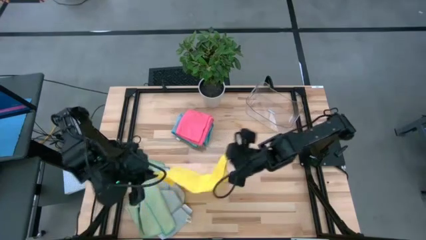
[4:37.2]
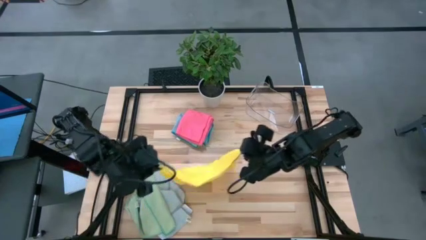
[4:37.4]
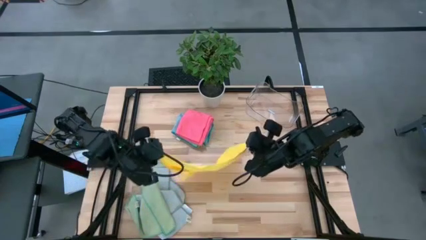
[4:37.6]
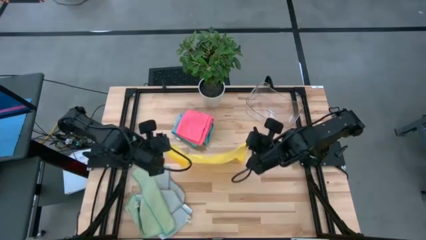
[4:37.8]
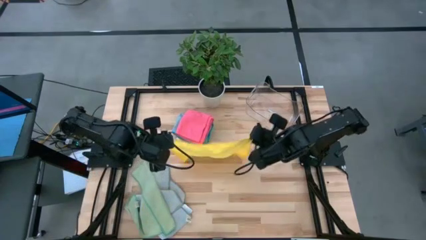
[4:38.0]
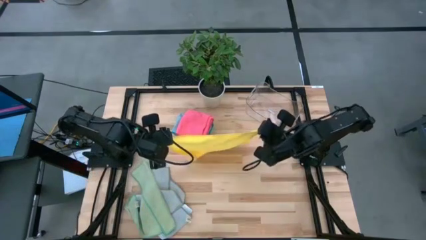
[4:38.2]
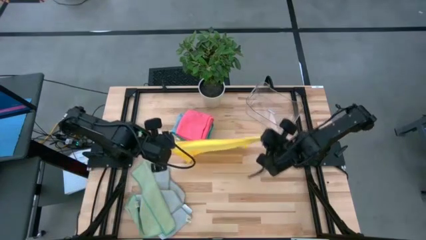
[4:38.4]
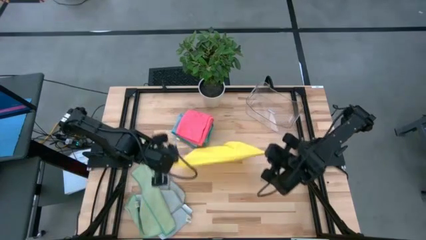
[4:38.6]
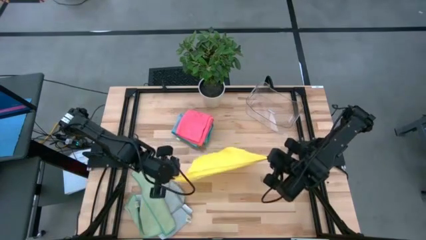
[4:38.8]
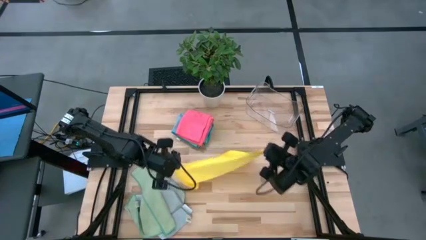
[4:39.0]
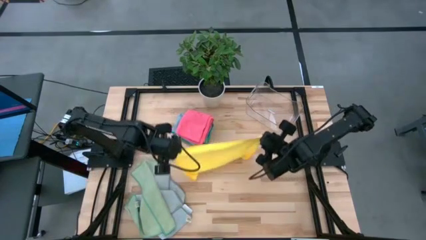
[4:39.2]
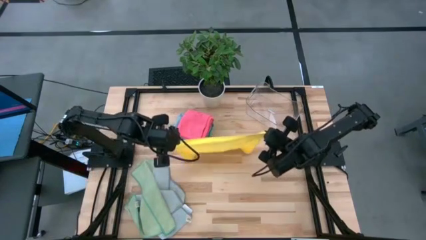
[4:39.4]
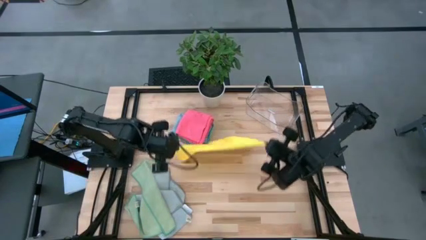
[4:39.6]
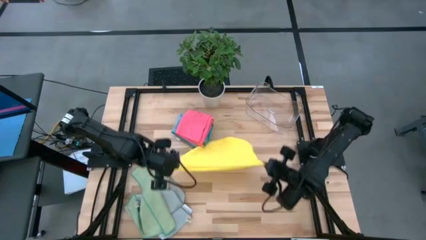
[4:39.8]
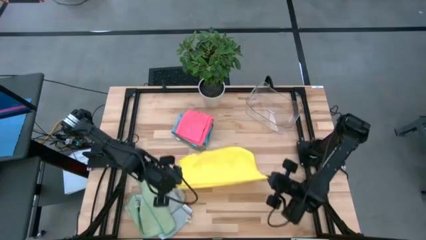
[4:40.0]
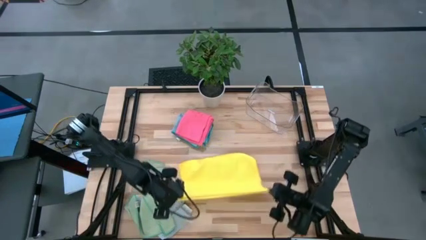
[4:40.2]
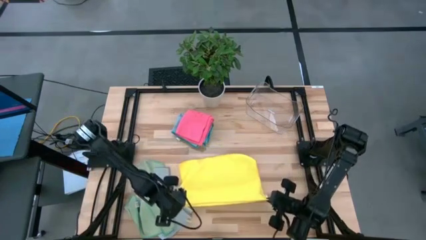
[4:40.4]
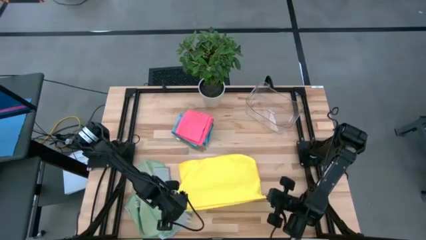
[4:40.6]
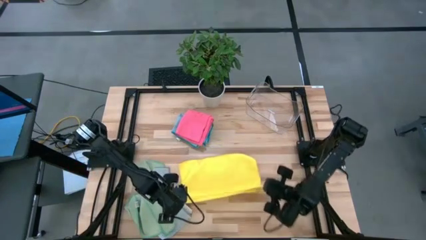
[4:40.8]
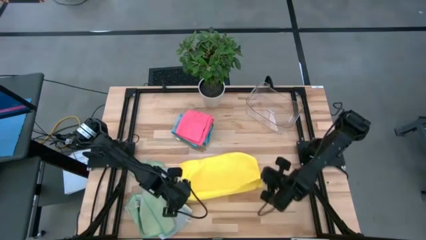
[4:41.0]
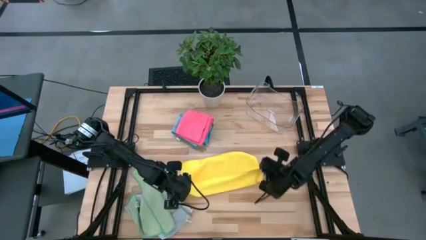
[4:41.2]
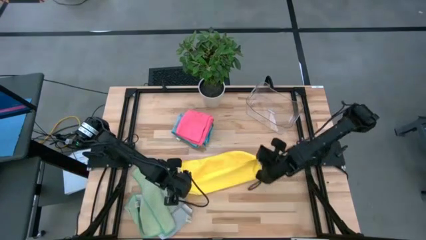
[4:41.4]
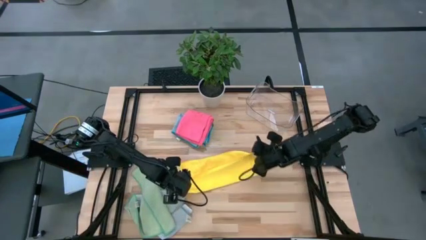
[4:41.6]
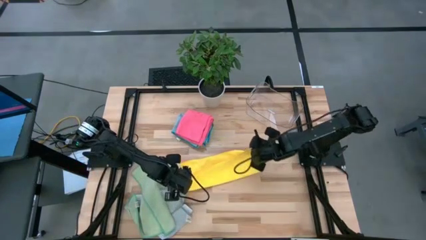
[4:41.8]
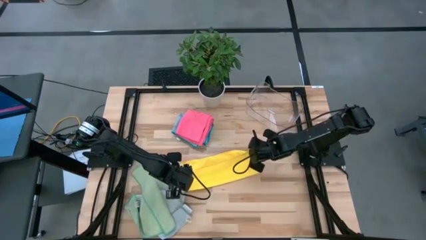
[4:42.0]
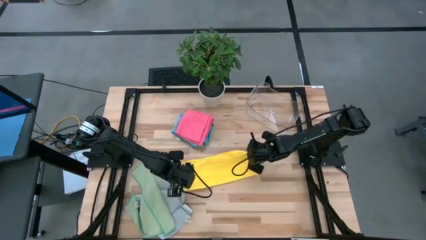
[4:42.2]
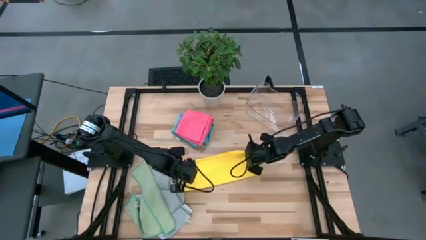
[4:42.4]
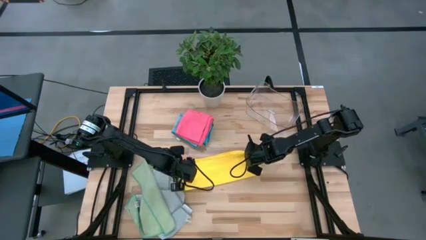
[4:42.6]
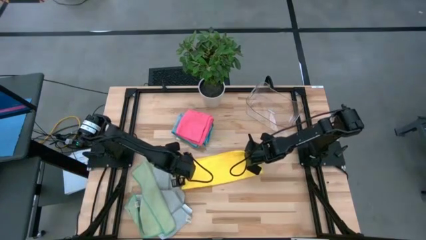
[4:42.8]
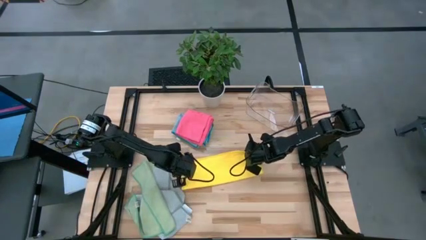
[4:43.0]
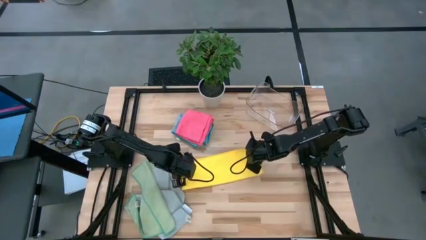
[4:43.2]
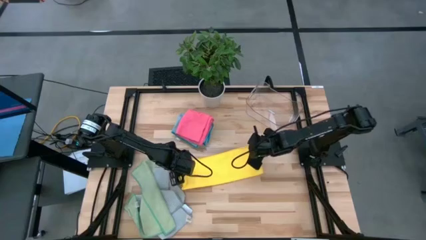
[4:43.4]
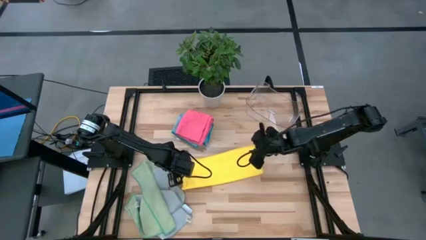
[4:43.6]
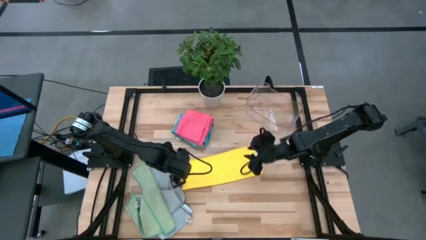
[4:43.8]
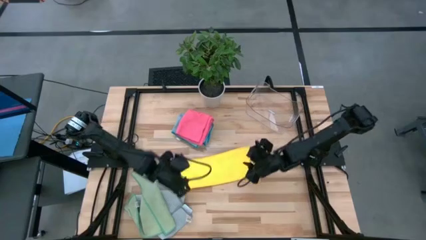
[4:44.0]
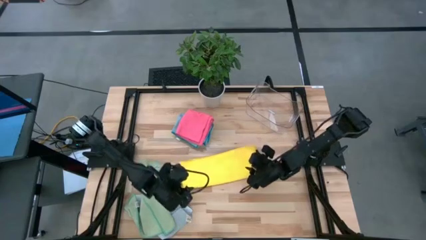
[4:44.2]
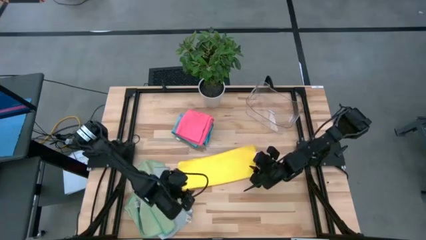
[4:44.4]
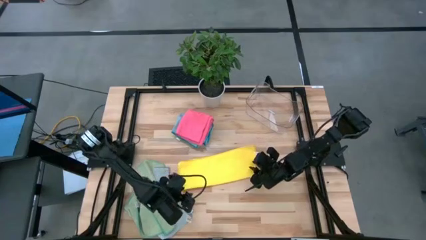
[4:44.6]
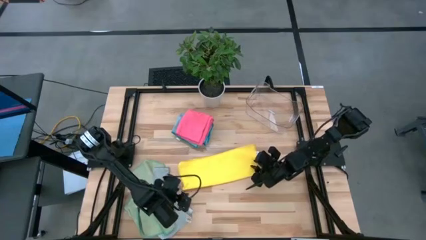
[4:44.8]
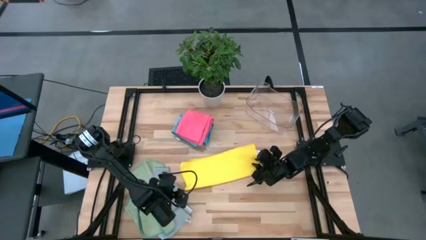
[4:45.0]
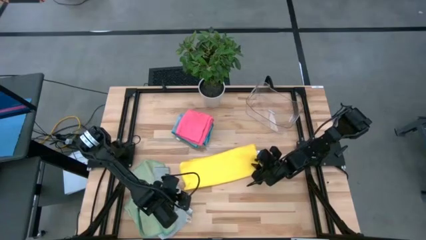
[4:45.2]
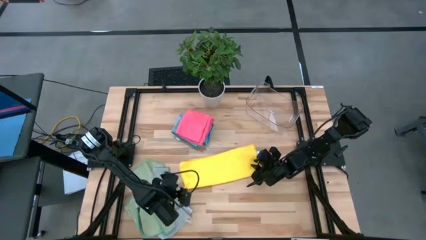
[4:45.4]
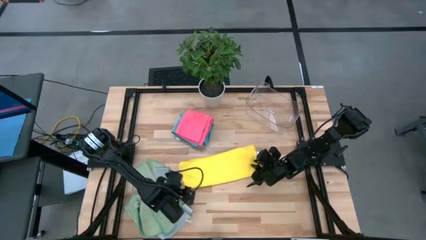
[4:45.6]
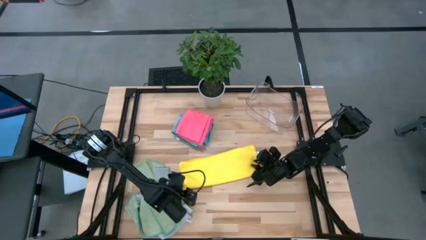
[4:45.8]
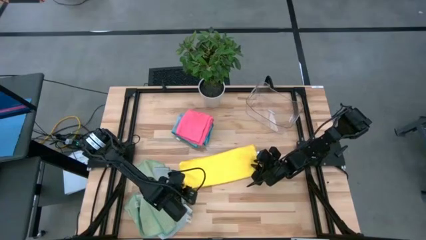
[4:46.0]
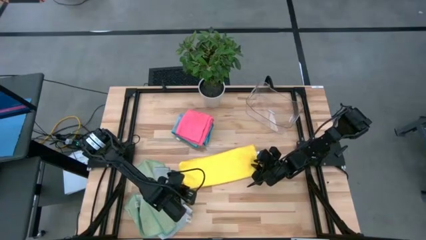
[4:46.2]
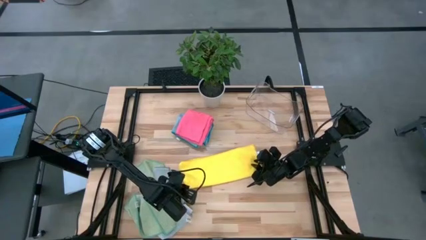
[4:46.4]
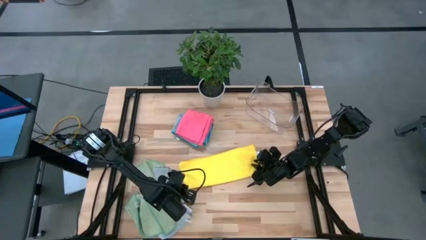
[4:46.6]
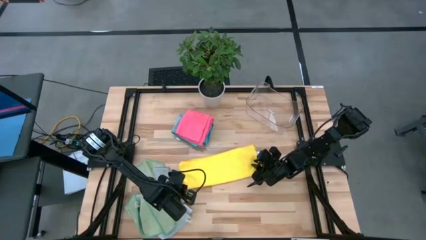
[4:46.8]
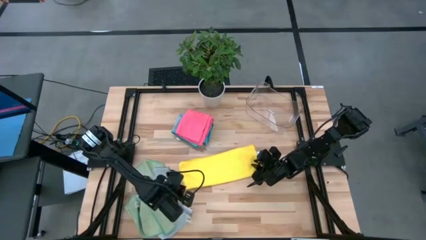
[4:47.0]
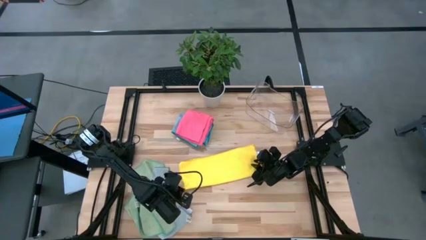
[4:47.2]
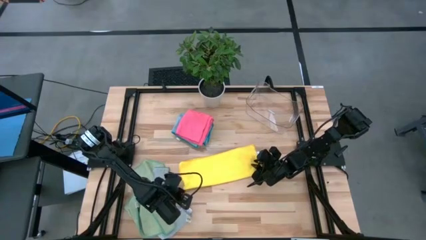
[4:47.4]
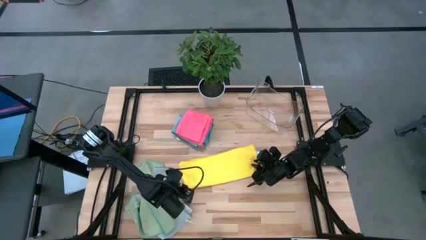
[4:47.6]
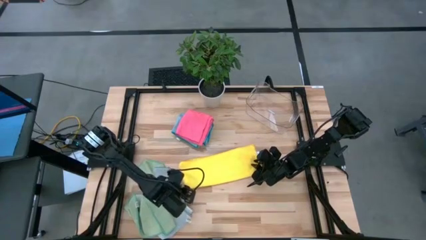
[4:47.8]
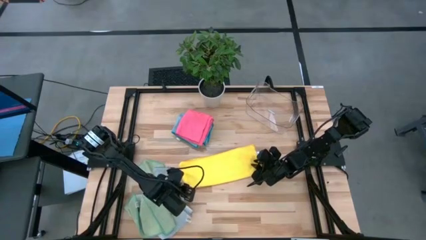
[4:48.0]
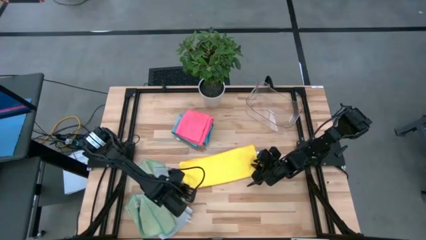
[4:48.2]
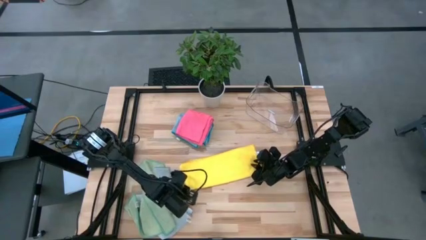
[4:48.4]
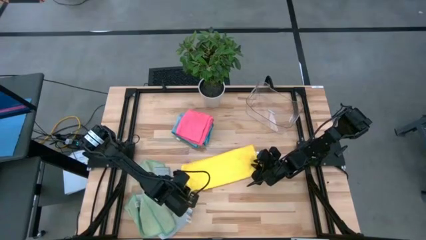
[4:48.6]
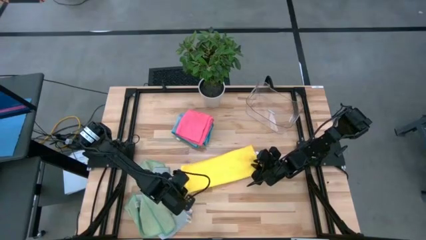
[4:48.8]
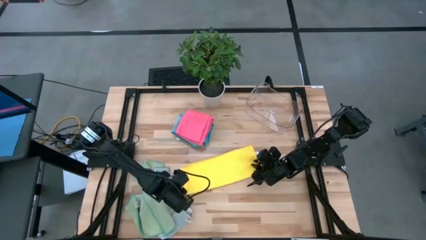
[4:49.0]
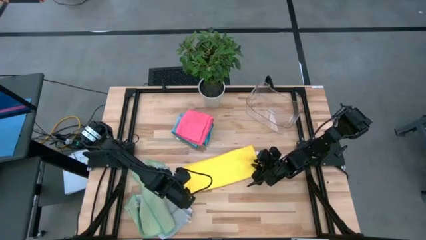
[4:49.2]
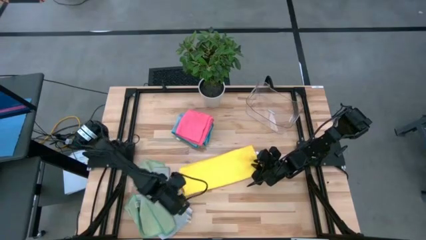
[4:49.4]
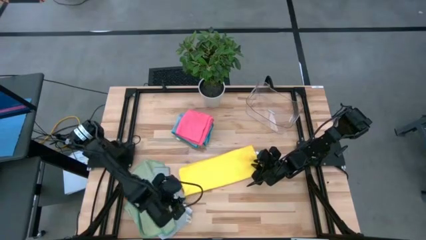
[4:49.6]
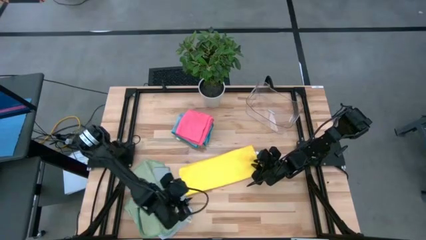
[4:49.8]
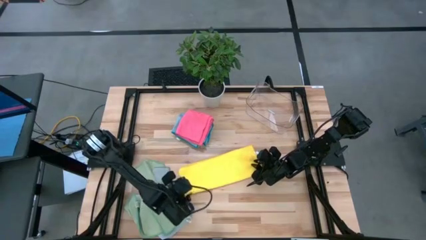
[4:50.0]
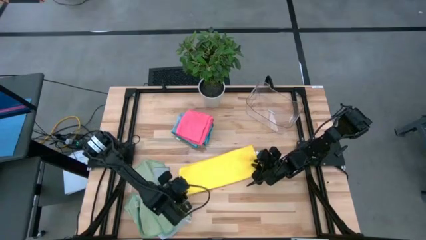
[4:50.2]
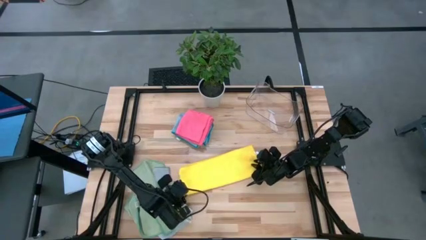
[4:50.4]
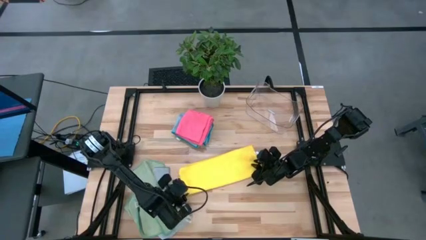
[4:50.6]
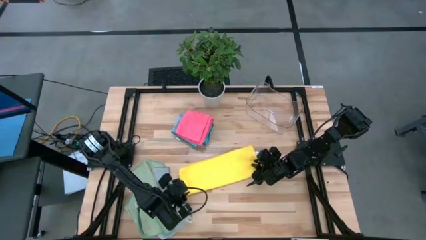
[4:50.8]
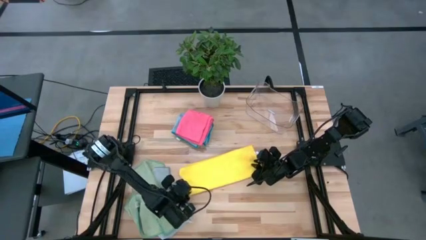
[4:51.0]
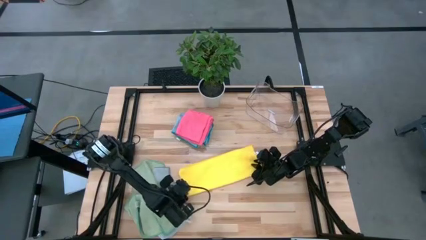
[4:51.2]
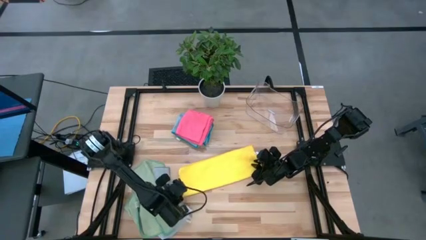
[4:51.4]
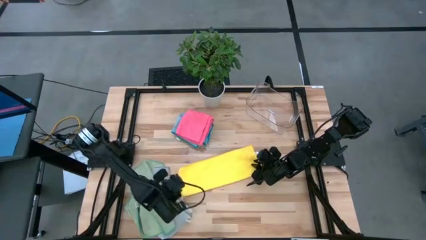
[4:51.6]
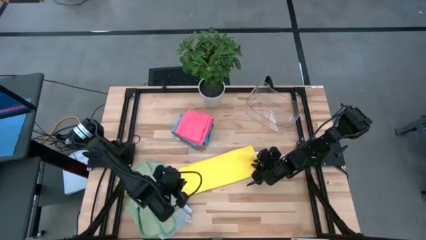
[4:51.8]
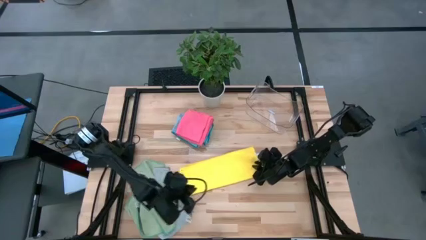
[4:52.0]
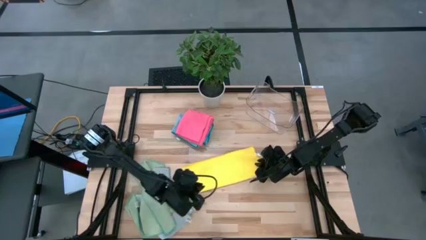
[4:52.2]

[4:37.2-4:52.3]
Task: Fold microfiber towels
Fold the yellow microfiber towel

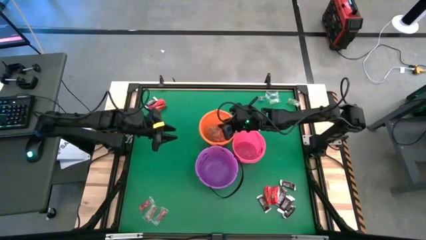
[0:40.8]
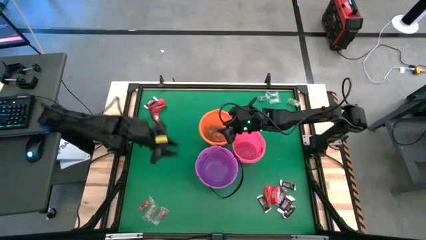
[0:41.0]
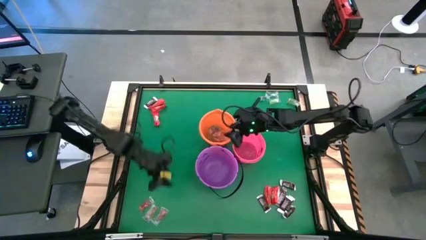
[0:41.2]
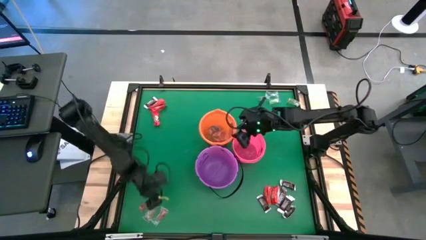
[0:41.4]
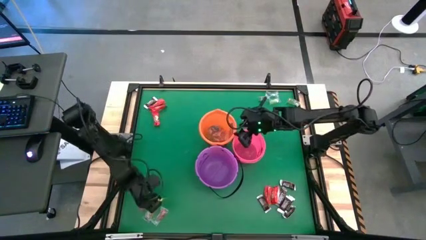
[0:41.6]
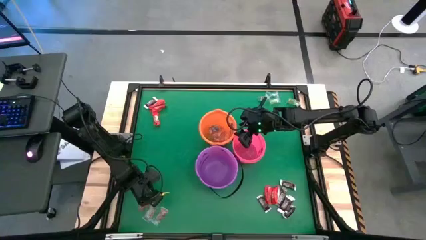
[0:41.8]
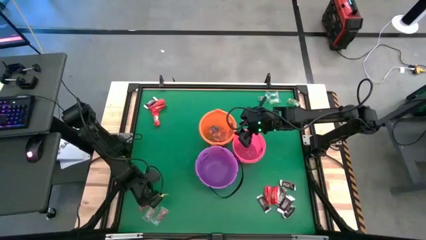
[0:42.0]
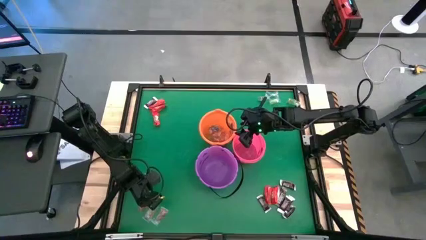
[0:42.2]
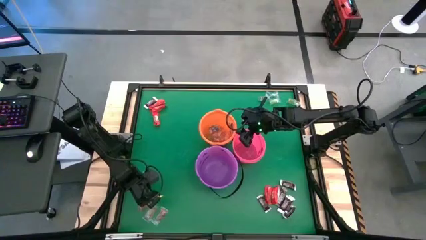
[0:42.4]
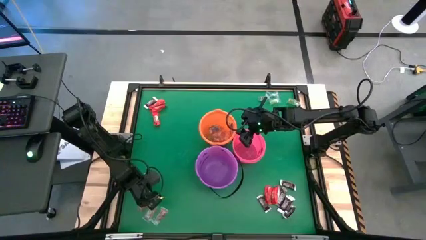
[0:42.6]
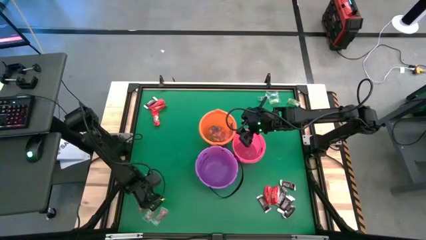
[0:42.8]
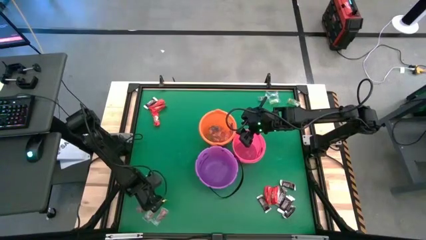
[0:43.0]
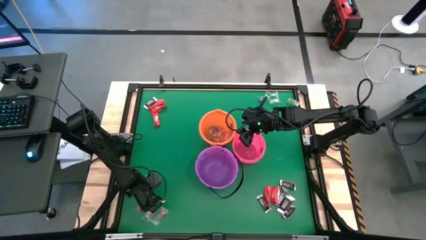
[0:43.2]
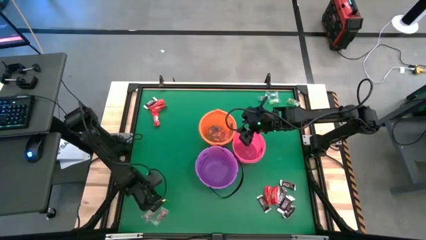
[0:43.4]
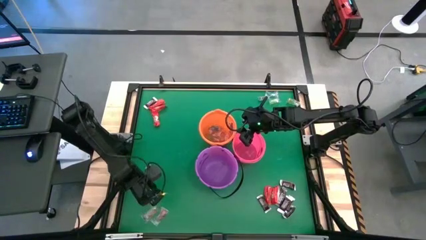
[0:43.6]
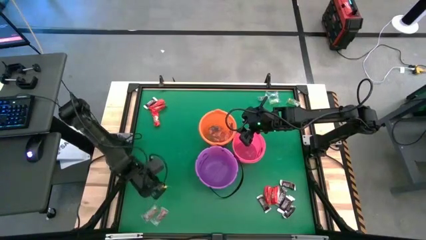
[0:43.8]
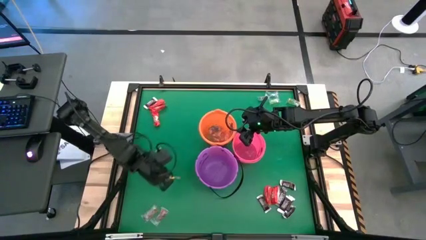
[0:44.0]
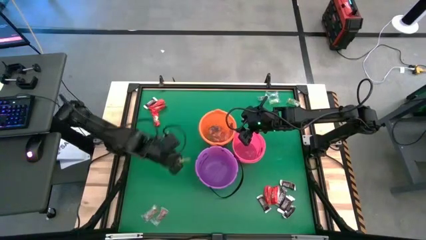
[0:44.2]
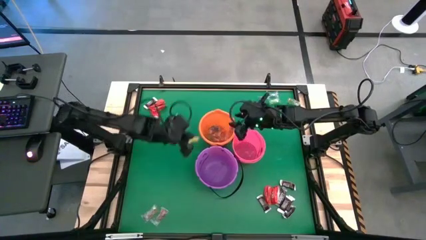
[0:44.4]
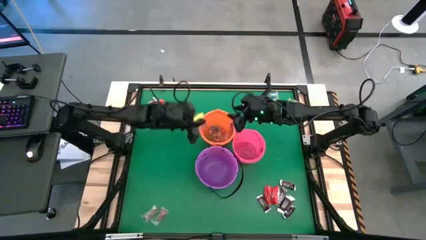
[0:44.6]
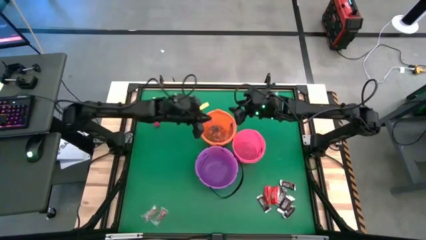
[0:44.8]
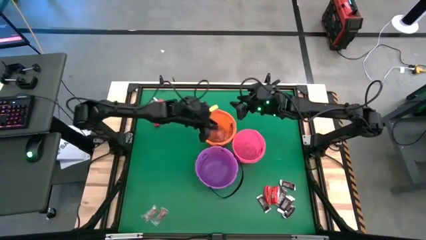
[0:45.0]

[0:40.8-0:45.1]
Task: Sort candy by brand, put in halloween buckets
Put the red gummy into the orange bucket
